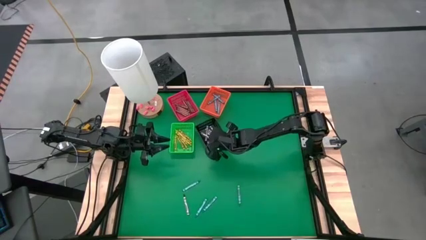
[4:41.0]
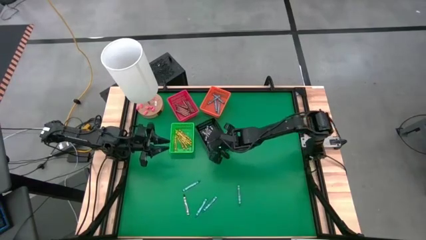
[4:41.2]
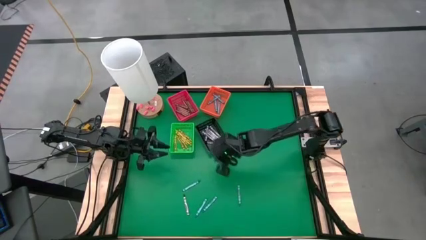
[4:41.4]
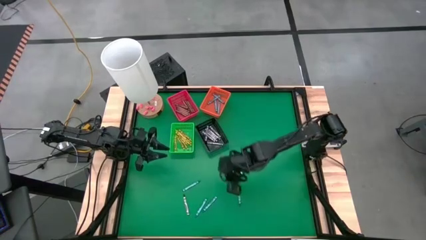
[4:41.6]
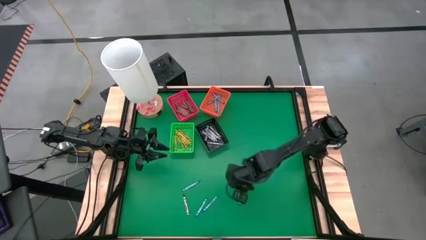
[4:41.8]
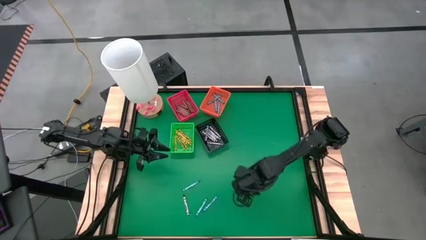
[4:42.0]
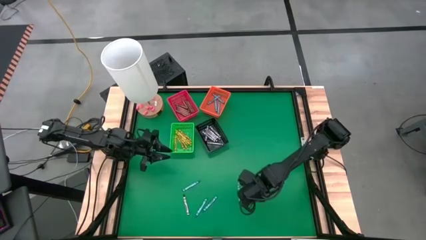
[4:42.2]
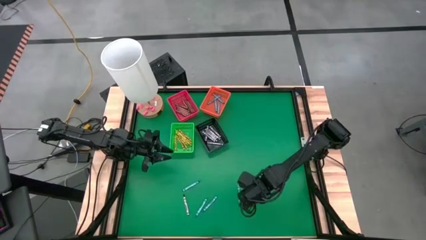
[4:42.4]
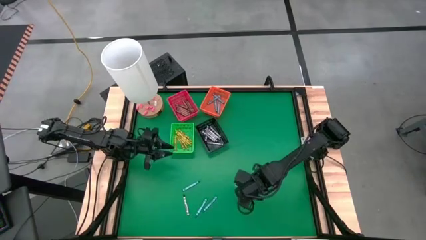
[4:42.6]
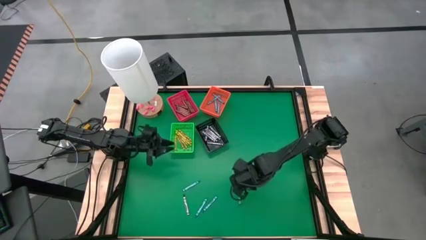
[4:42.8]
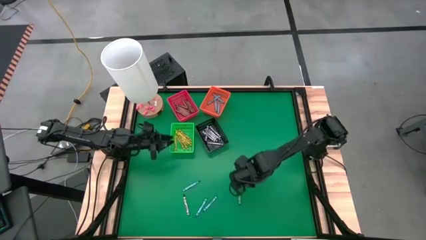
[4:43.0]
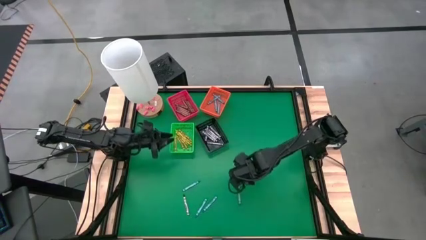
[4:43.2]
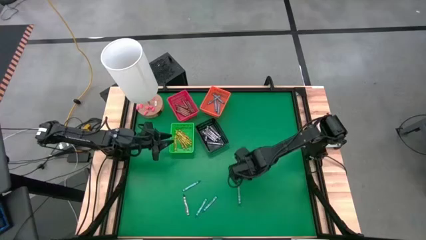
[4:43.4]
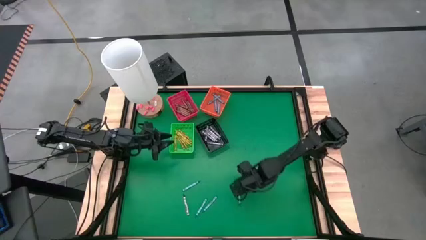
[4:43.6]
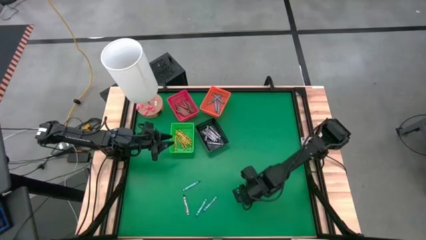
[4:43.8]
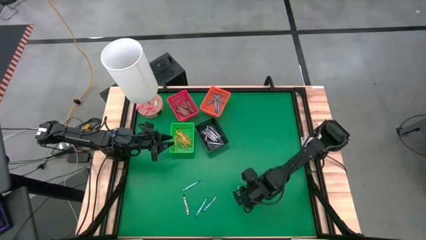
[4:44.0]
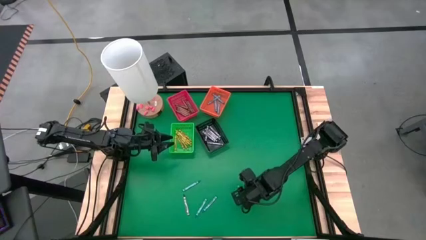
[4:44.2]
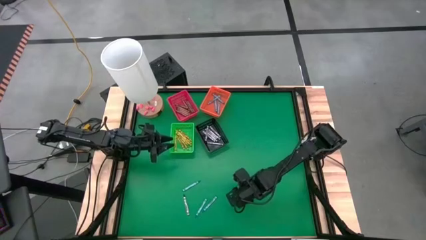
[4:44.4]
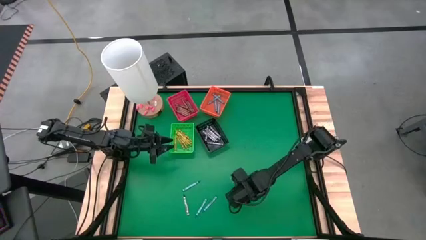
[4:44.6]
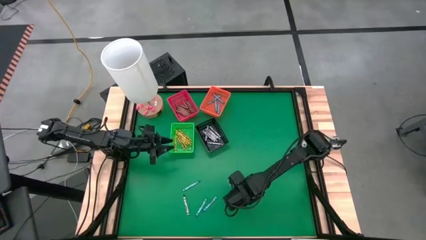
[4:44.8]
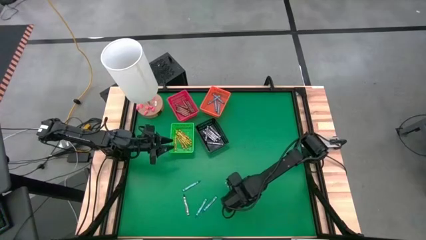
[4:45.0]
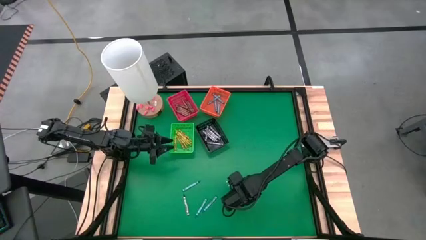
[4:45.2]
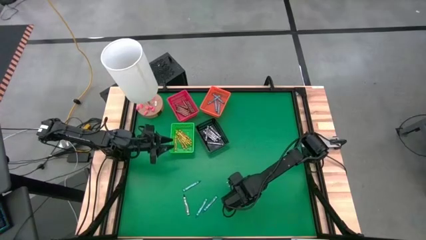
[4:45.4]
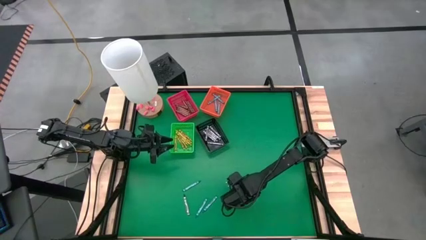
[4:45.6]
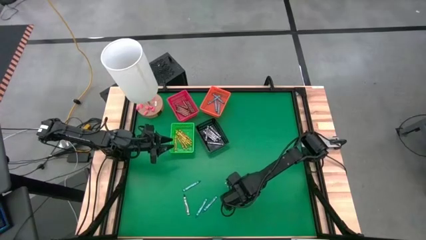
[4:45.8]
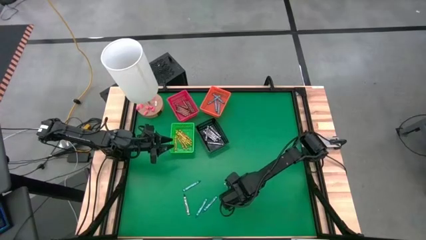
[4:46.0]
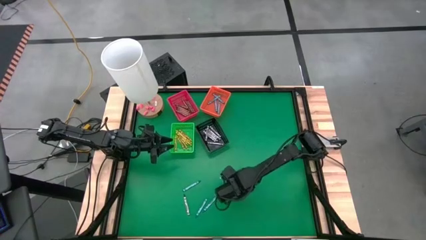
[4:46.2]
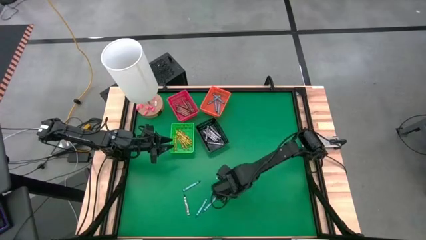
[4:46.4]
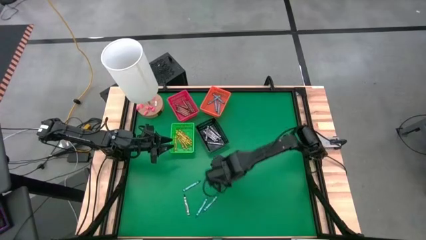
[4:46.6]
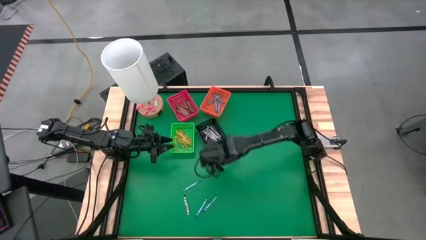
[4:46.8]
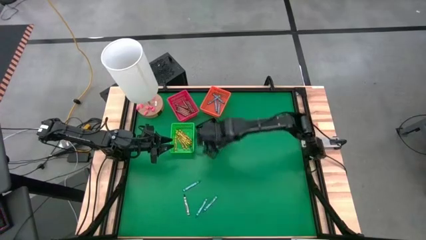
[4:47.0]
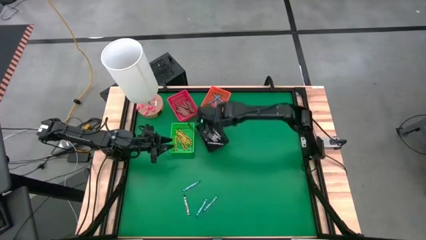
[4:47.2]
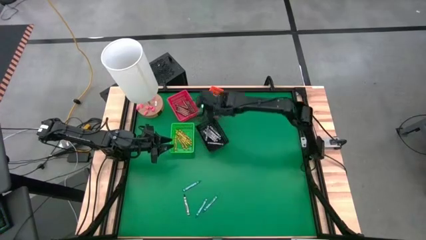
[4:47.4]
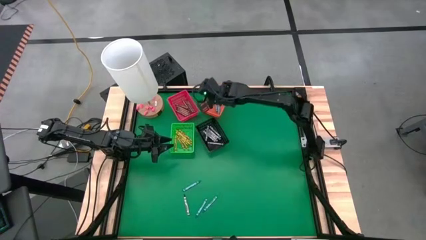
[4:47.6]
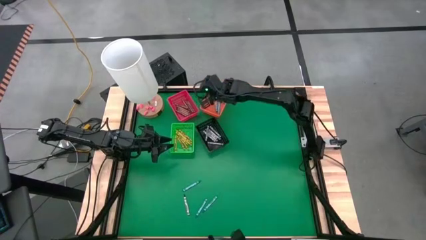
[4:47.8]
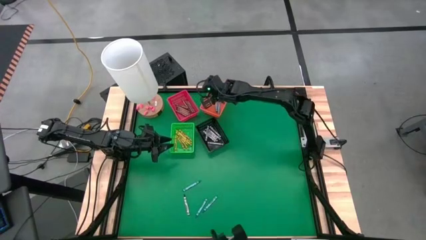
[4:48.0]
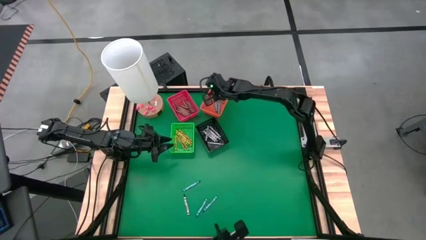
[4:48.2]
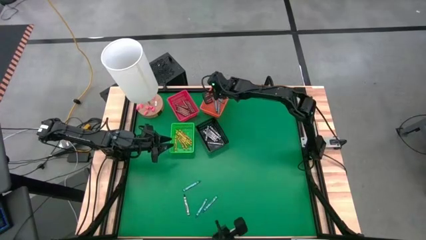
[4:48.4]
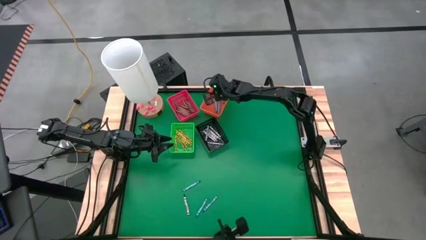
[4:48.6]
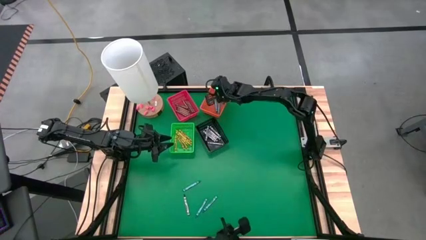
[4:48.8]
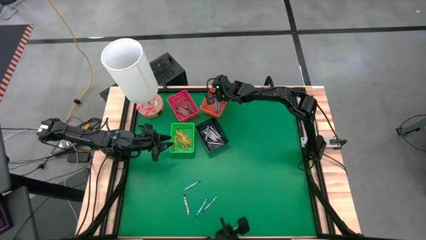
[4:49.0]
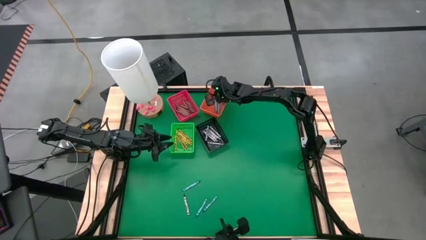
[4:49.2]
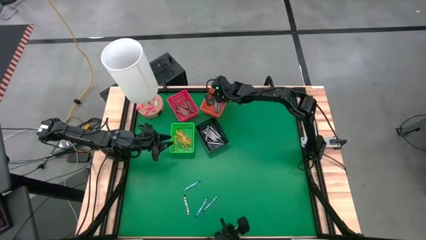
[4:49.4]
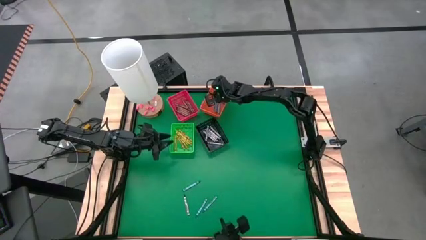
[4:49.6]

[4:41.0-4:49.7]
Task: Sort crayons
Put the blue crayon into the orange bin

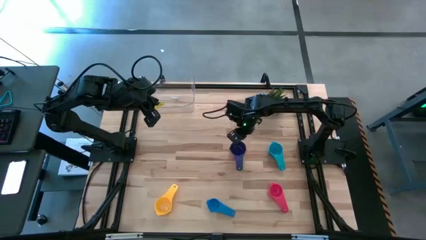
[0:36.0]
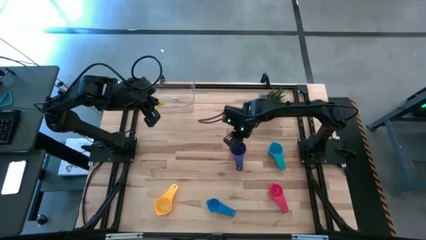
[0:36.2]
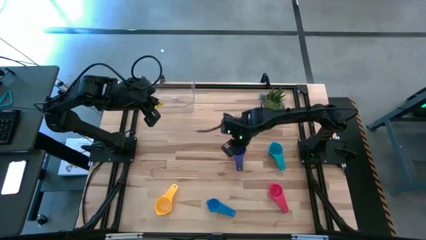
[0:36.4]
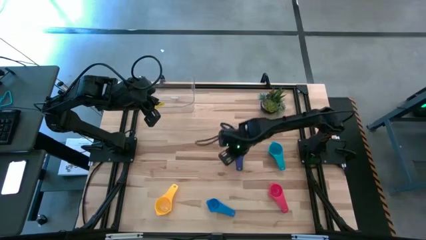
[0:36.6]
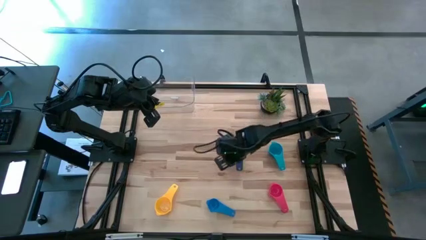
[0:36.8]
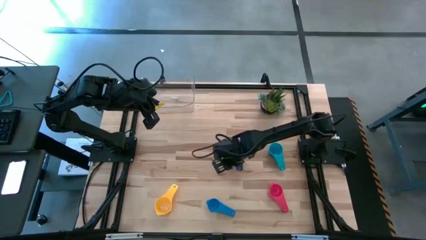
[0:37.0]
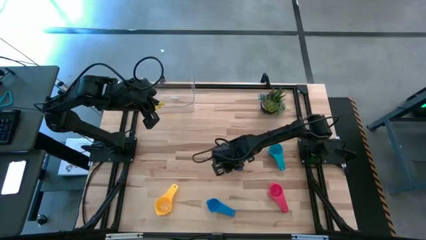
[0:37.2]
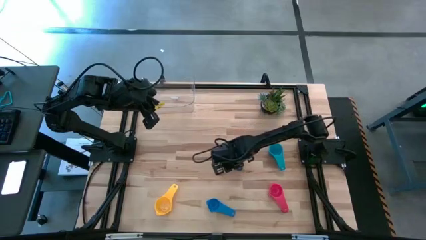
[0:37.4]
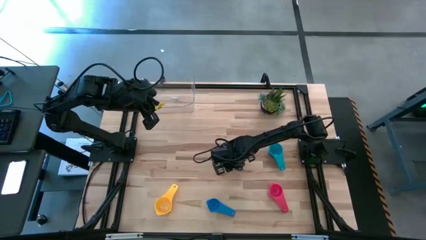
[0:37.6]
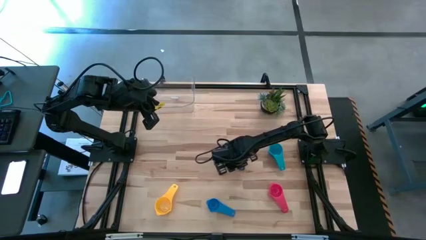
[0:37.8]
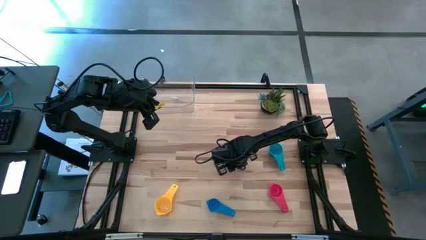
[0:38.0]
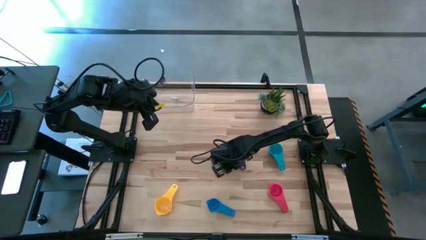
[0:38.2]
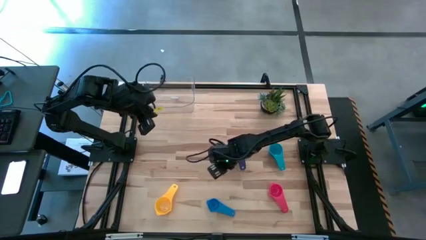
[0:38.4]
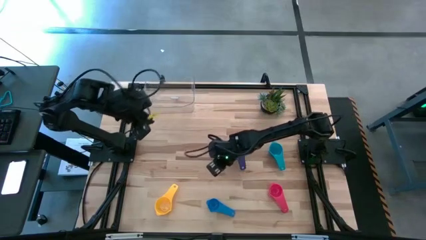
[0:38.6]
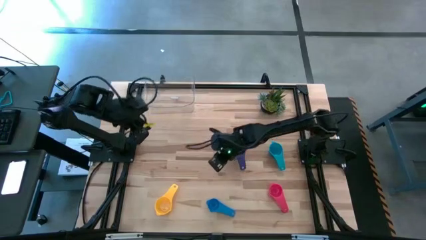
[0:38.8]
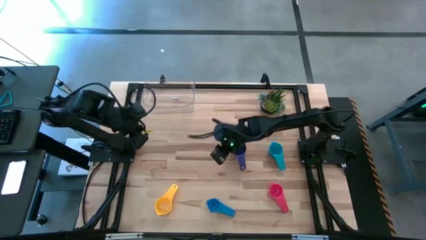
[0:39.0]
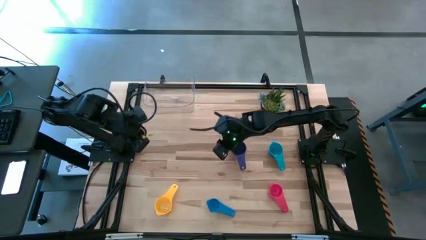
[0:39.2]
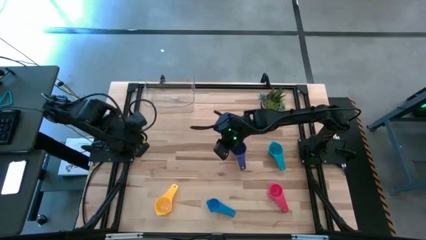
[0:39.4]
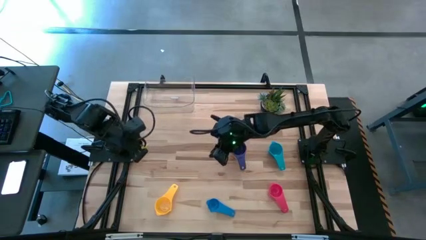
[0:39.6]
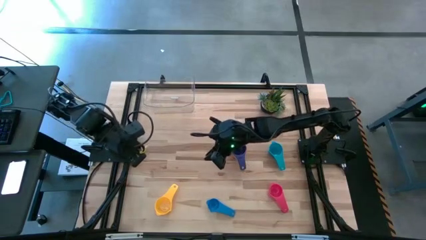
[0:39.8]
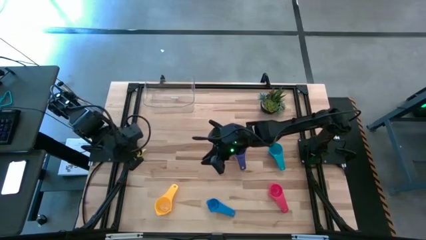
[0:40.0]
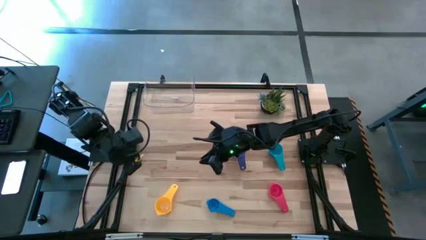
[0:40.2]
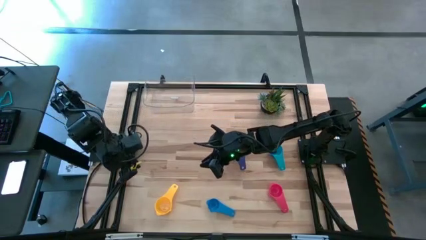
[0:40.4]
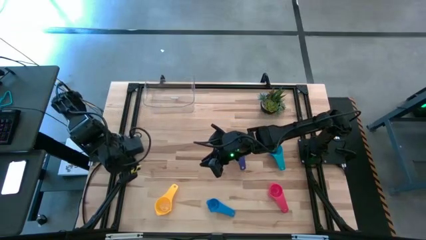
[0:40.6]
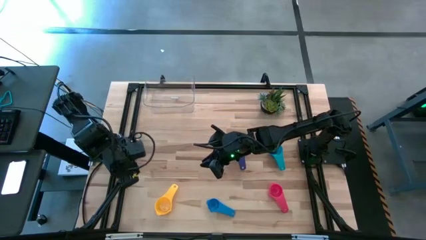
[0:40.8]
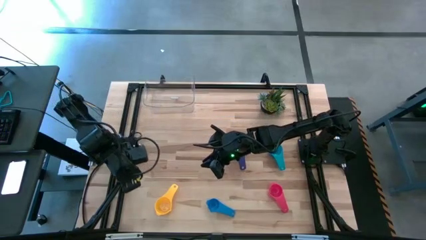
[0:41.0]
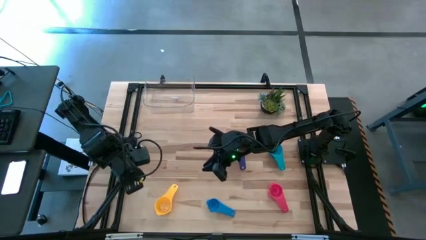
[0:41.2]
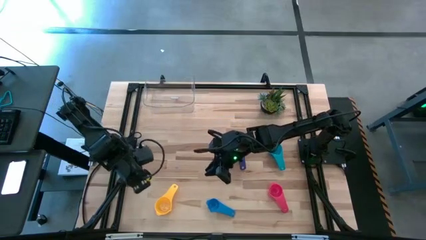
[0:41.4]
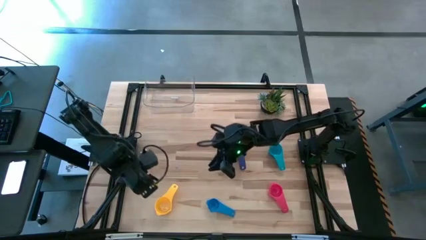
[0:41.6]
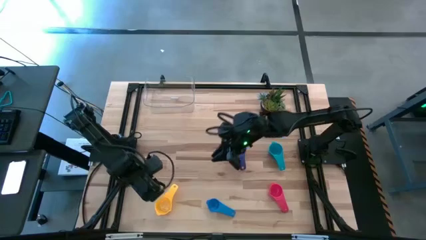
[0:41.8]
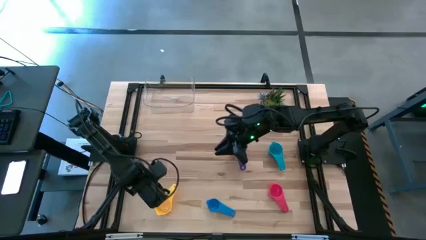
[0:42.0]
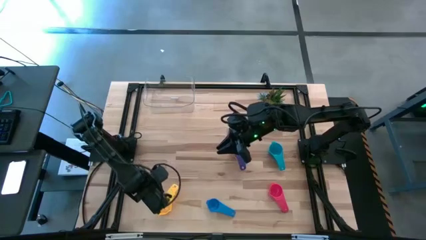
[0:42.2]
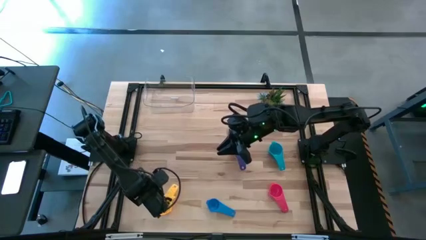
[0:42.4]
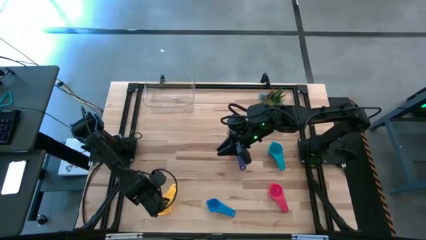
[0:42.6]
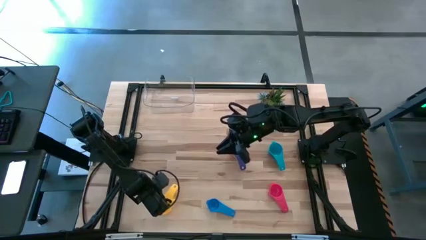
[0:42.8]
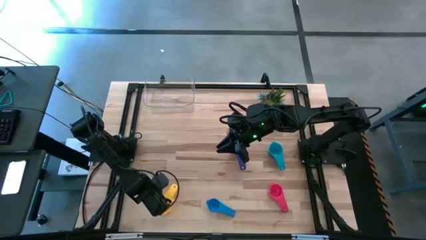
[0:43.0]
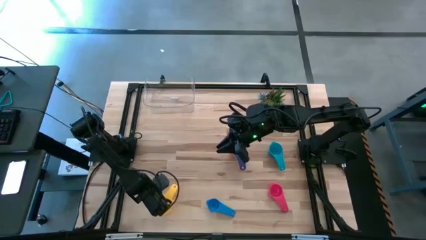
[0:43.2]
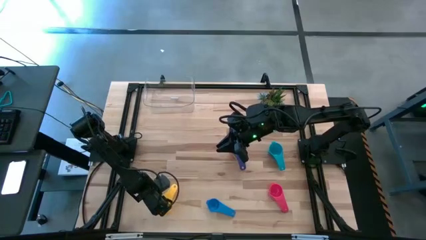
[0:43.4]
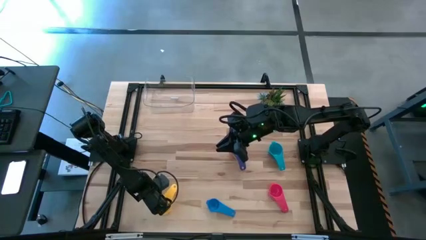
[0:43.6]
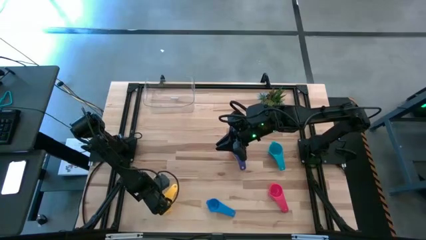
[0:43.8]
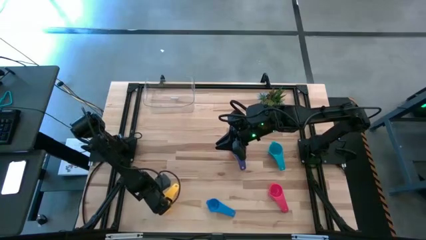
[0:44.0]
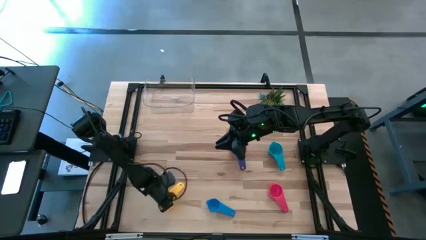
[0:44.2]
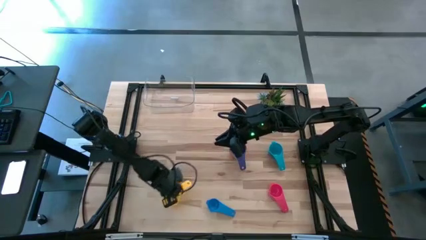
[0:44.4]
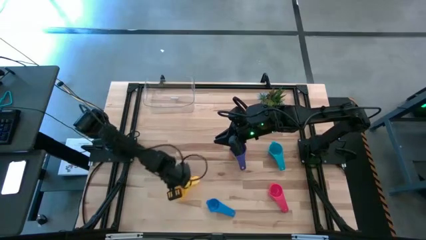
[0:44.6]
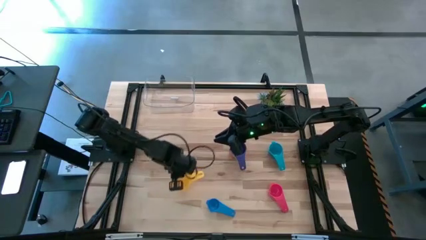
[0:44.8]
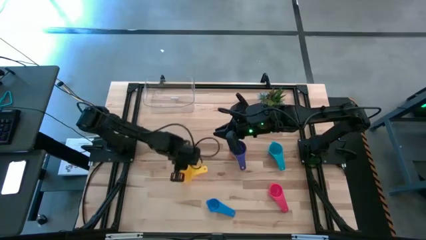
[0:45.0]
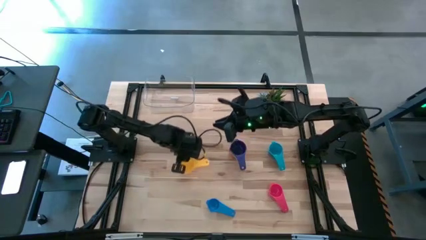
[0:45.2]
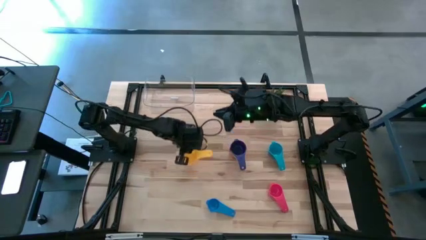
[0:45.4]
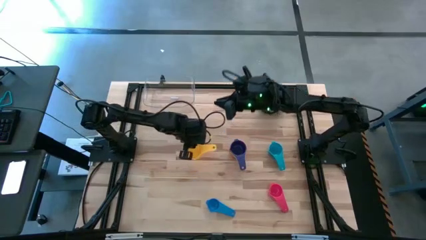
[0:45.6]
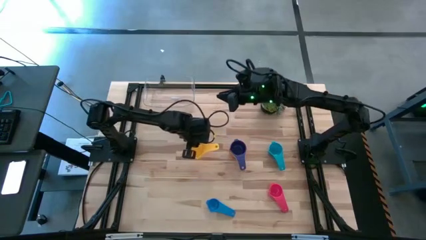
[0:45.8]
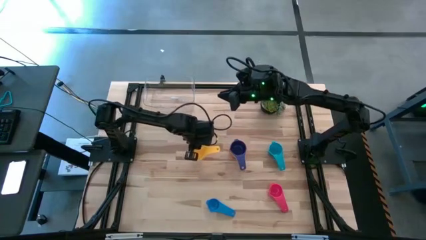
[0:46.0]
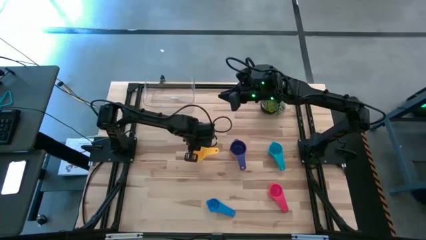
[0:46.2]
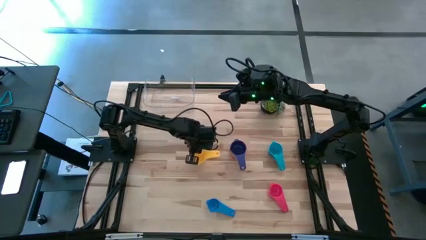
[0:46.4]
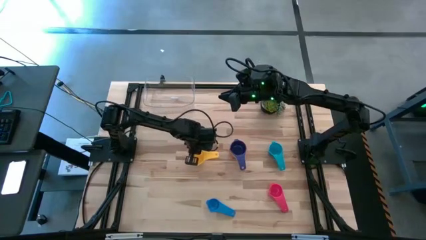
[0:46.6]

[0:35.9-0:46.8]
Task: Nest measuring cups in basket
Stack the yellow measuring cup on top of the dark blue measuring cup
